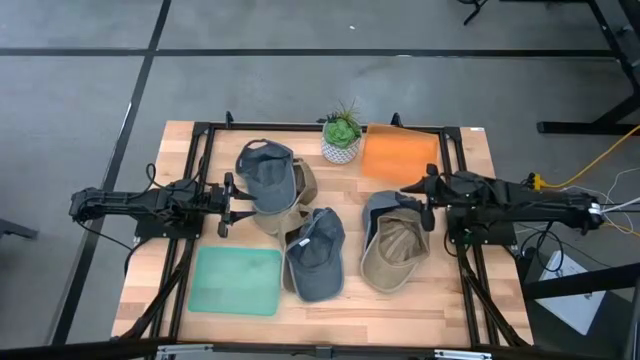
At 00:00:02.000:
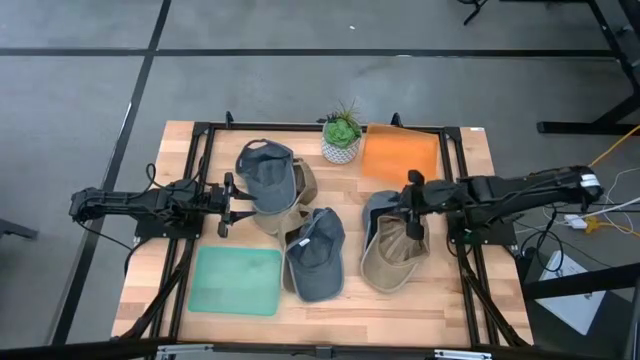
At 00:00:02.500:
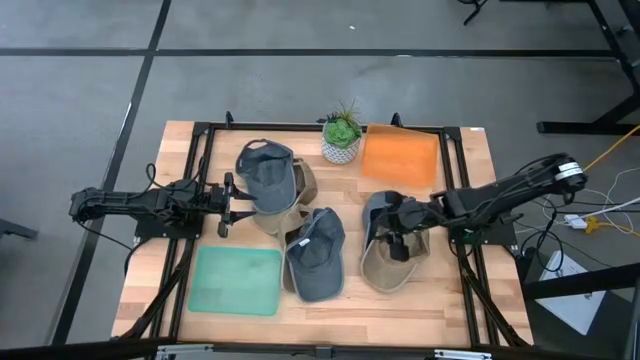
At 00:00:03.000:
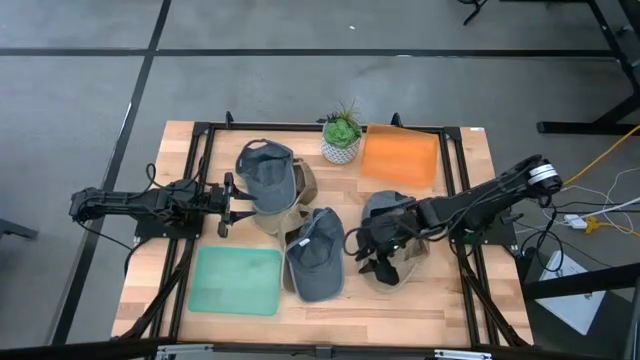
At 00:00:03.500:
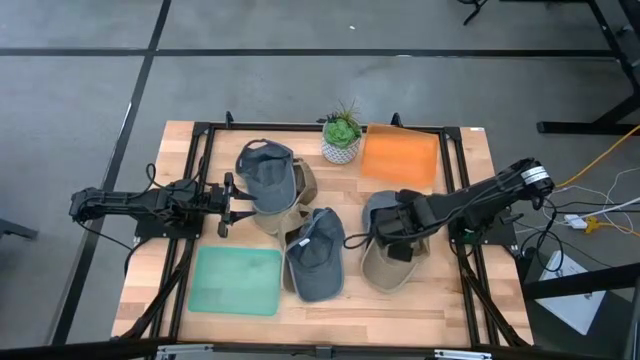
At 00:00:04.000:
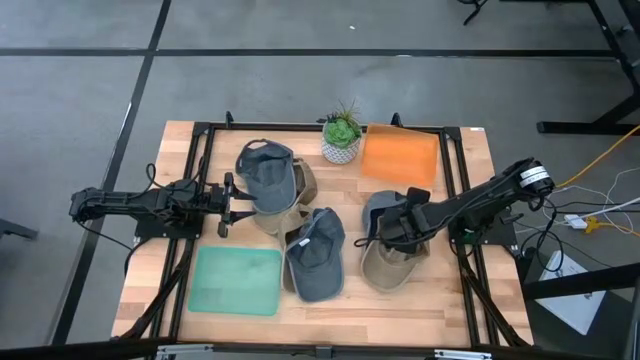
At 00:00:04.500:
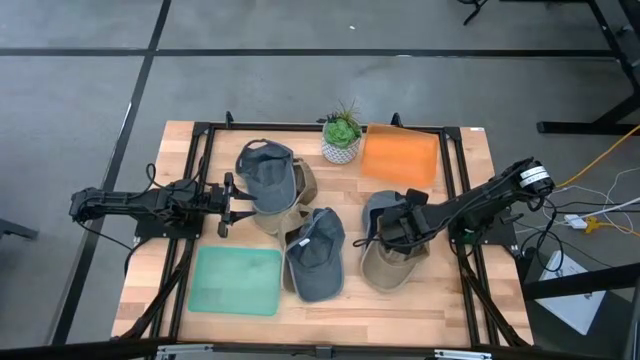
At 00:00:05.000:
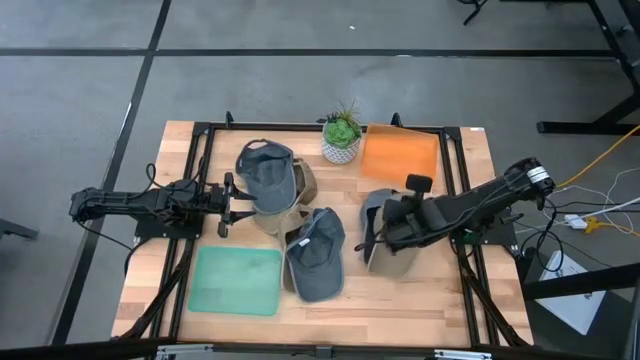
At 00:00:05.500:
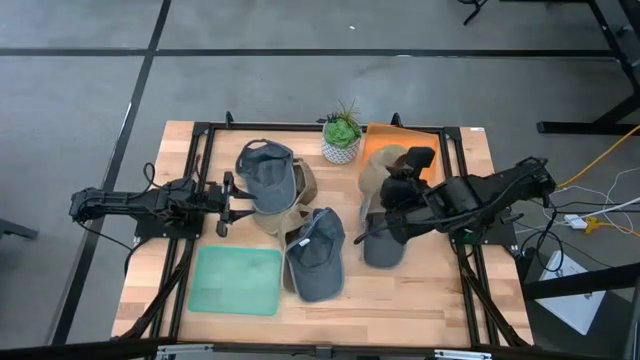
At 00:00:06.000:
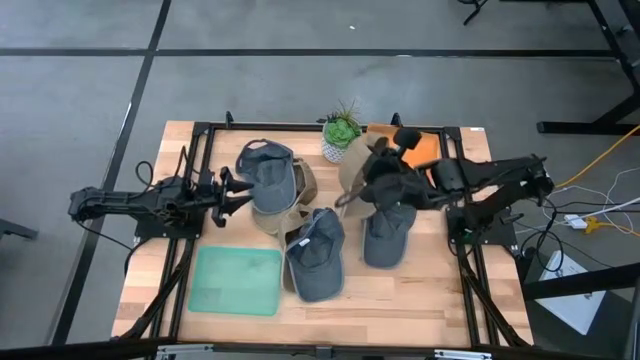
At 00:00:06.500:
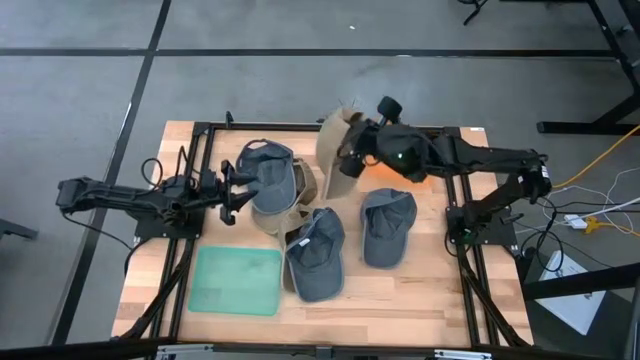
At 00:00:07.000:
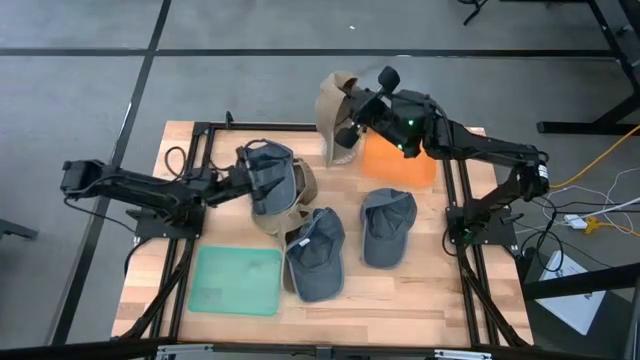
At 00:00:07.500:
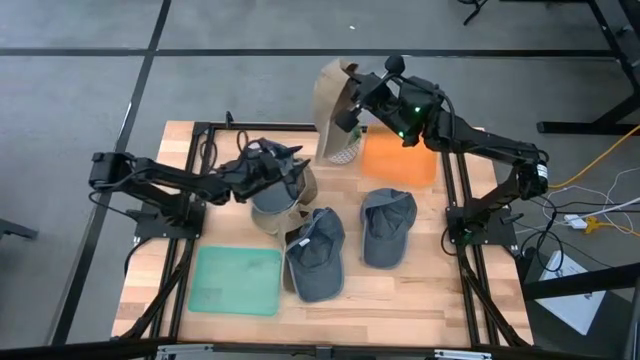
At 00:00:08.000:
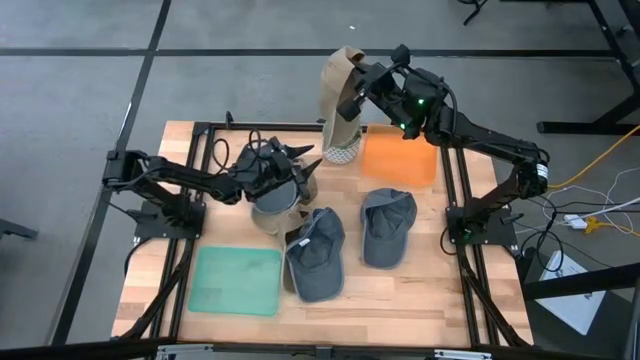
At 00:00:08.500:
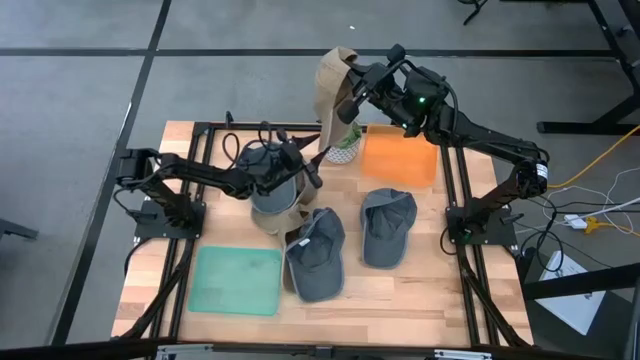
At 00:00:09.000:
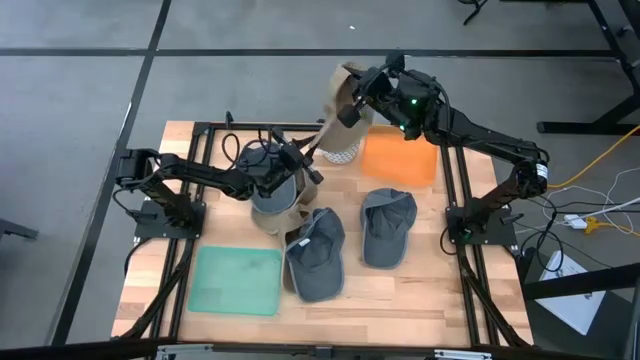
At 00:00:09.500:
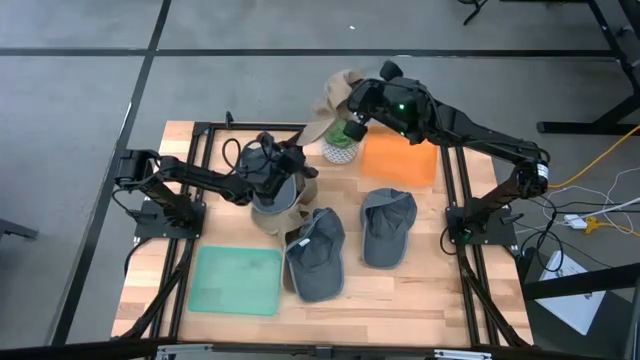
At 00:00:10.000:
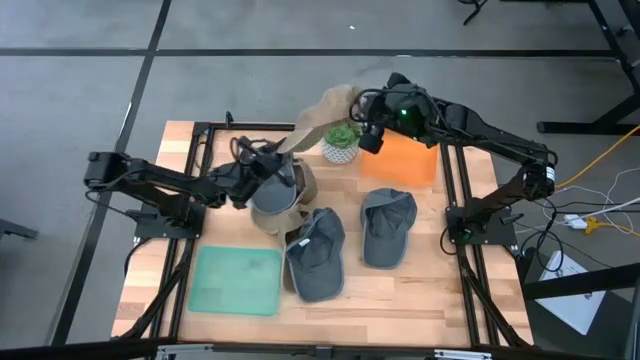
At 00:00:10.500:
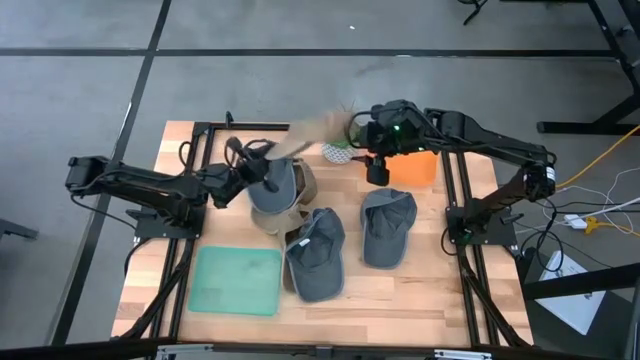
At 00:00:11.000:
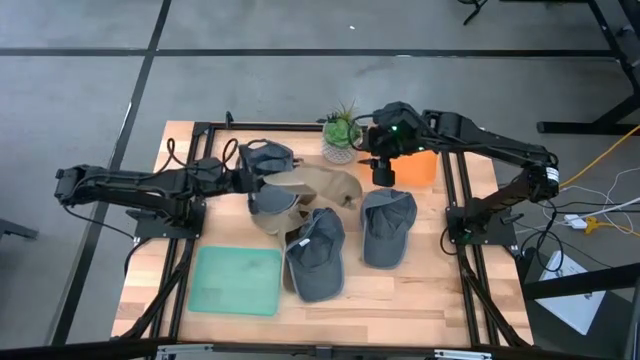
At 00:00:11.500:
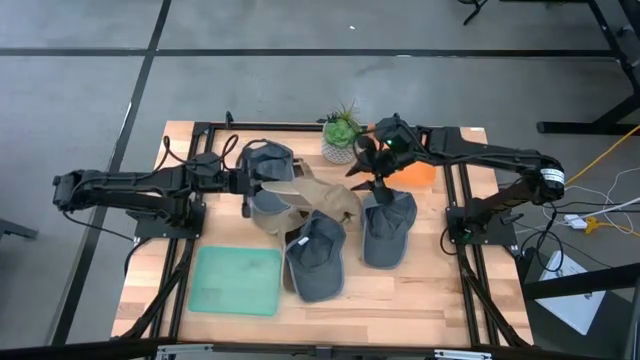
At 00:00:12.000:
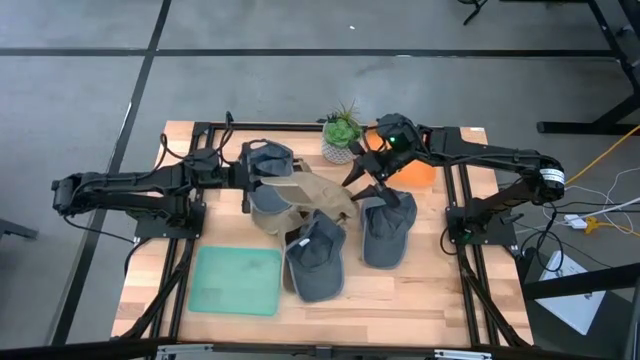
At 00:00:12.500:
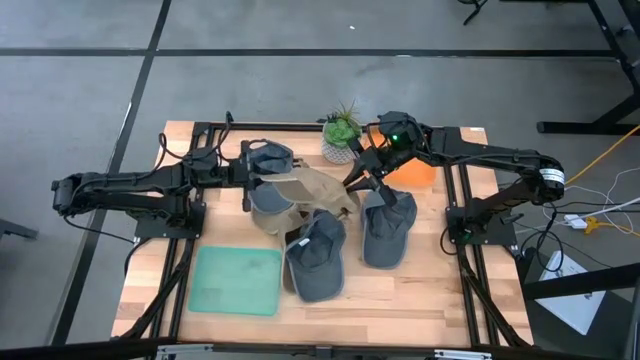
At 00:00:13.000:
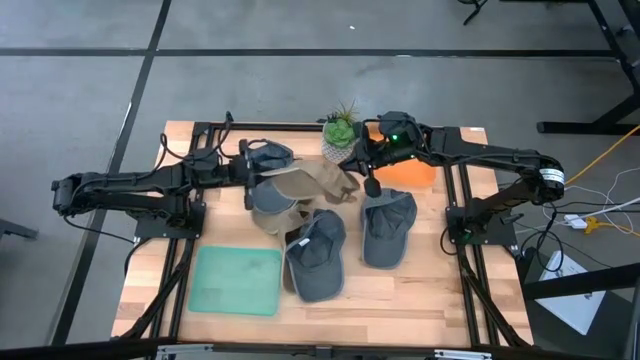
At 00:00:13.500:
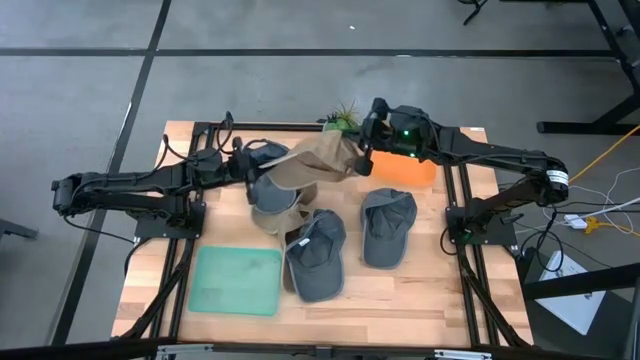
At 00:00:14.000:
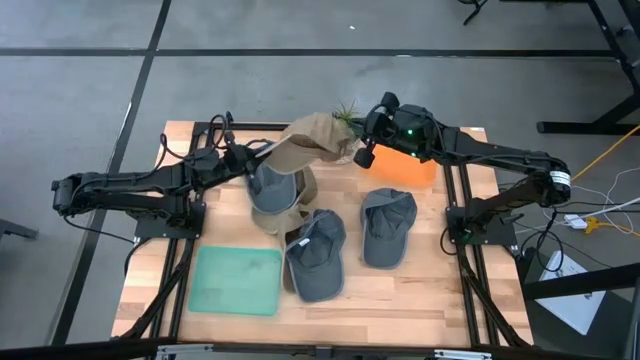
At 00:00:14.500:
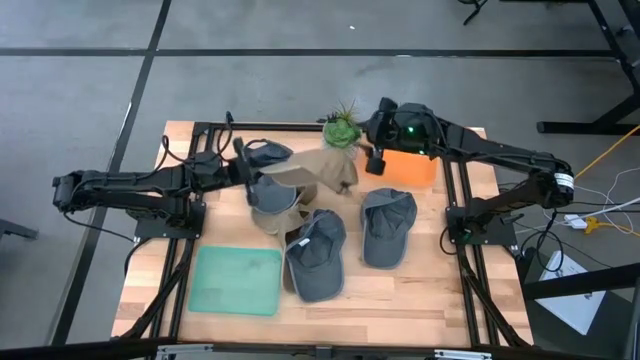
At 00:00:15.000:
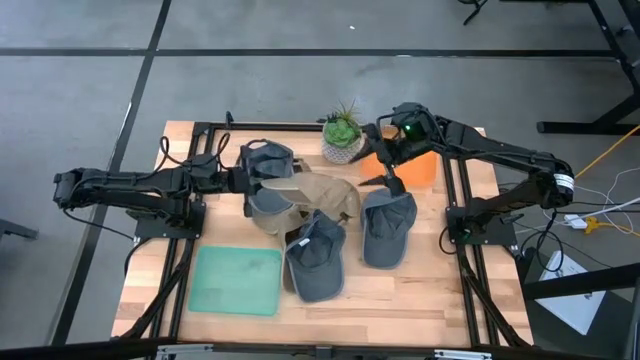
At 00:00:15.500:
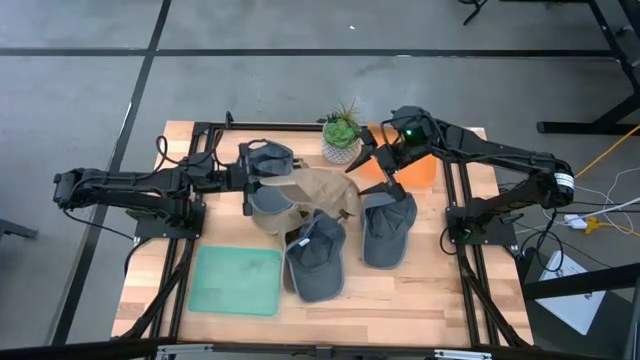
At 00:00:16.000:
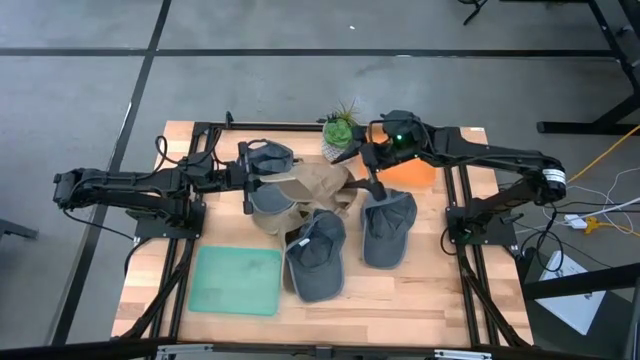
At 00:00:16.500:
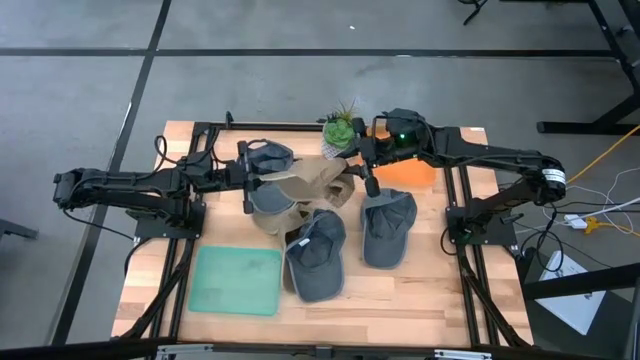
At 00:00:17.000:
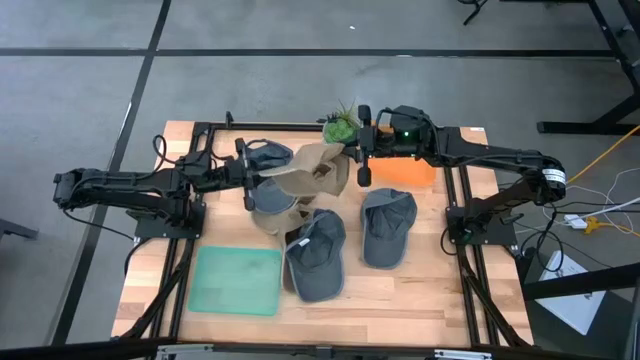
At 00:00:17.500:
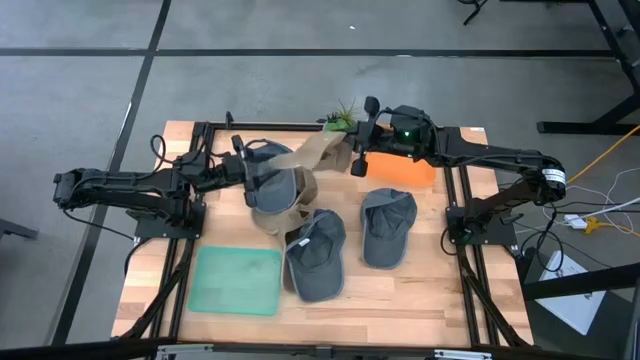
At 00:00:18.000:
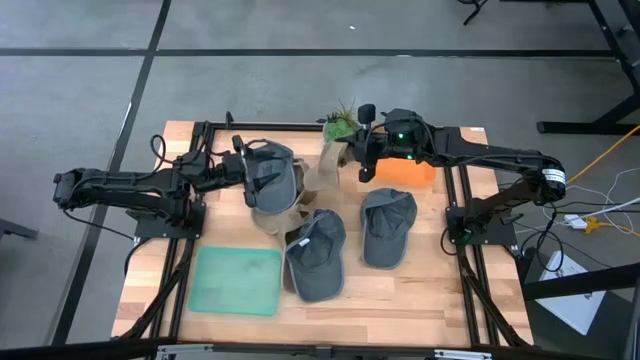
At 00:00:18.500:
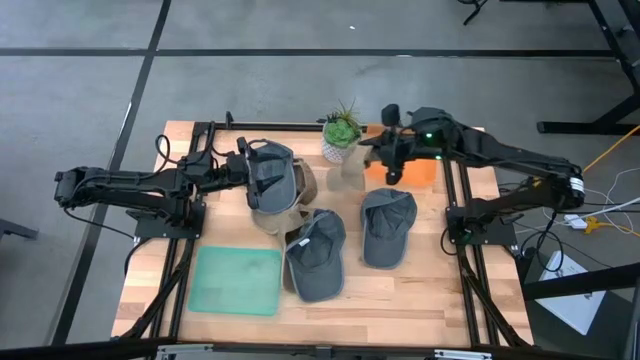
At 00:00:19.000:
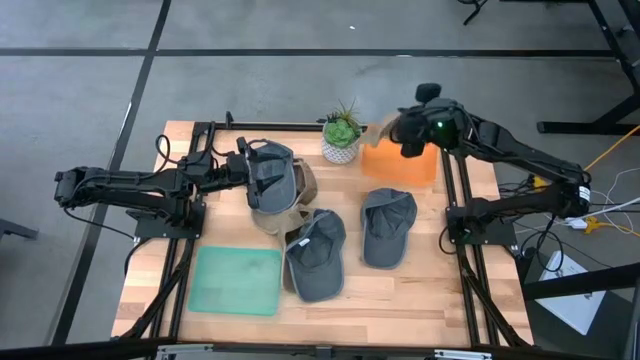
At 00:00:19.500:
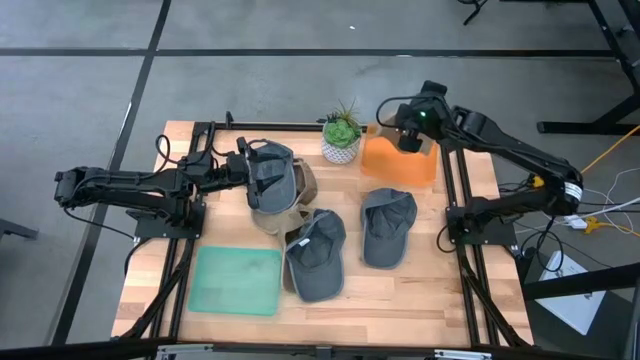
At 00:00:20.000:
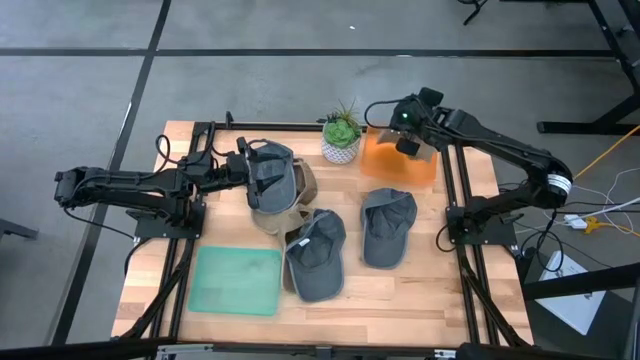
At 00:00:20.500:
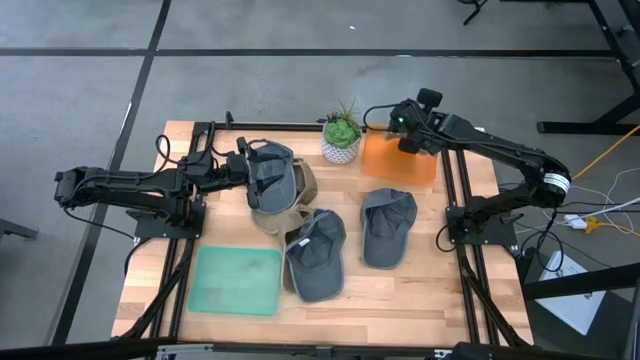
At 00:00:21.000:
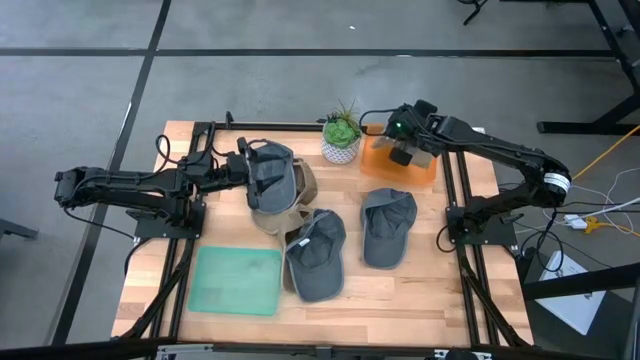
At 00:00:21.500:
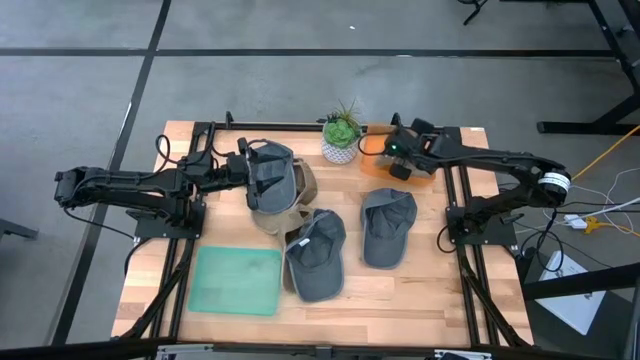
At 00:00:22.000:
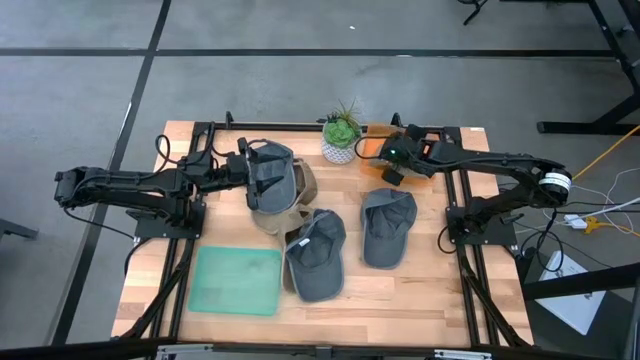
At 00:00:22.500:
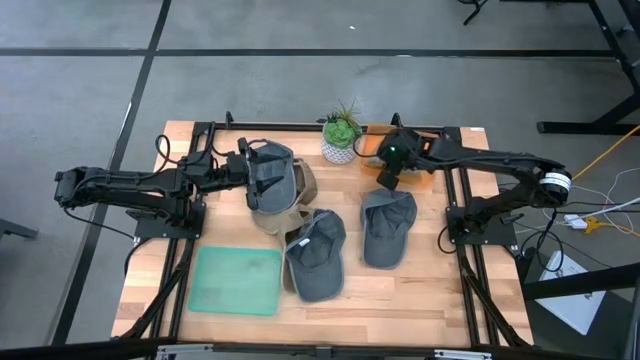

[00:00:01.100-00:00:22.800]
Task: Pick & Place hat
Put the bottom right brown cap into the orange bin
